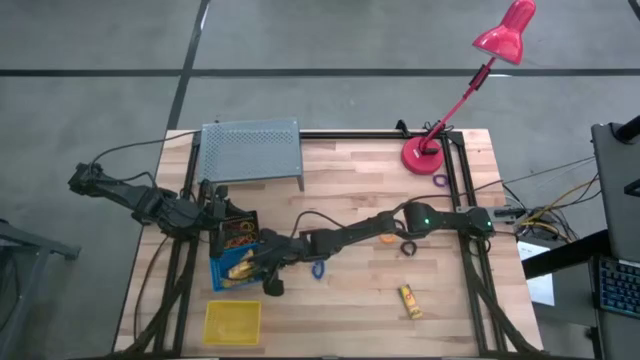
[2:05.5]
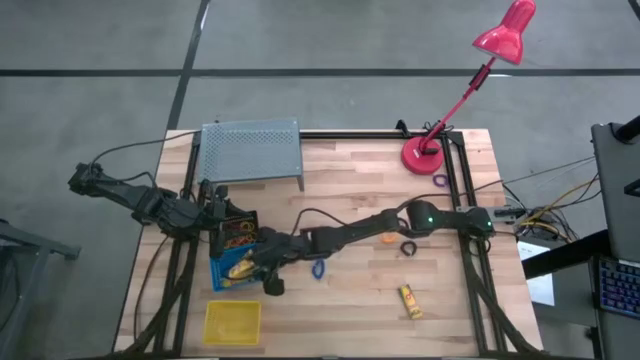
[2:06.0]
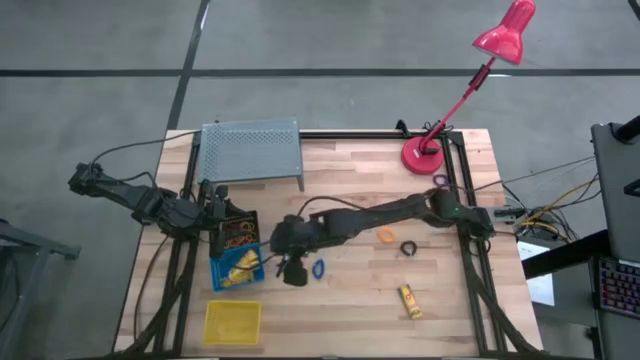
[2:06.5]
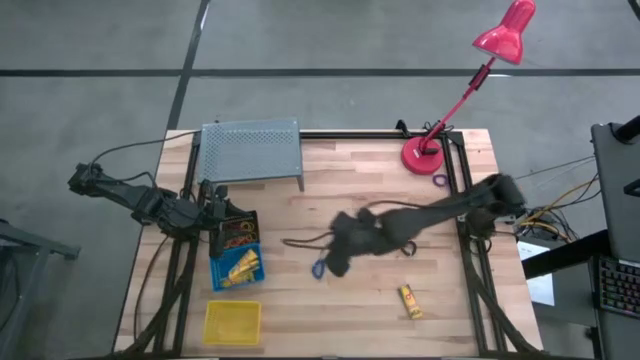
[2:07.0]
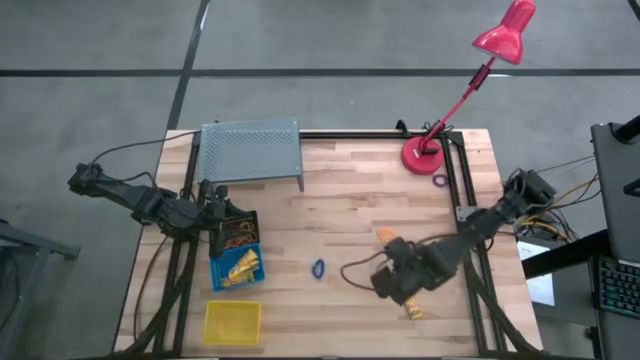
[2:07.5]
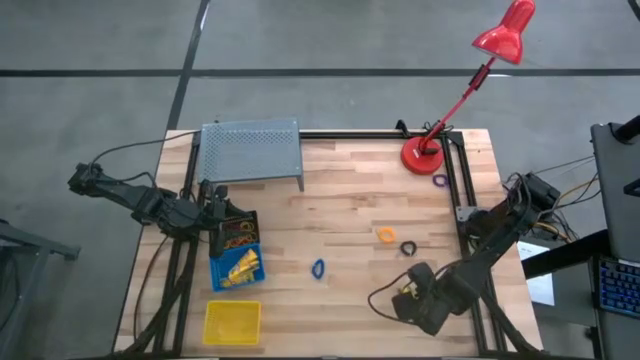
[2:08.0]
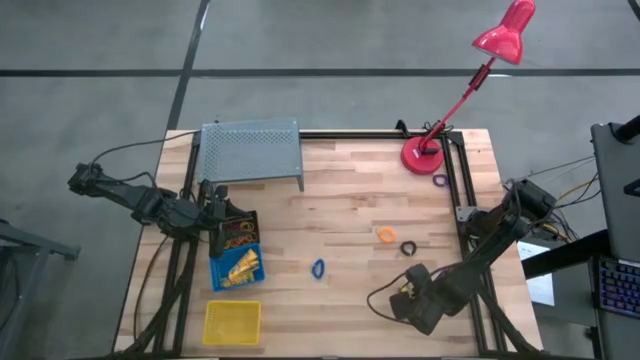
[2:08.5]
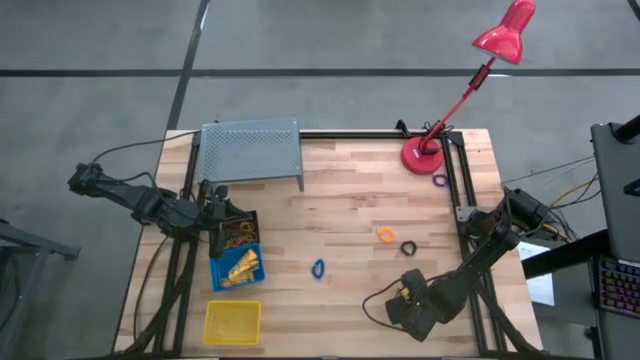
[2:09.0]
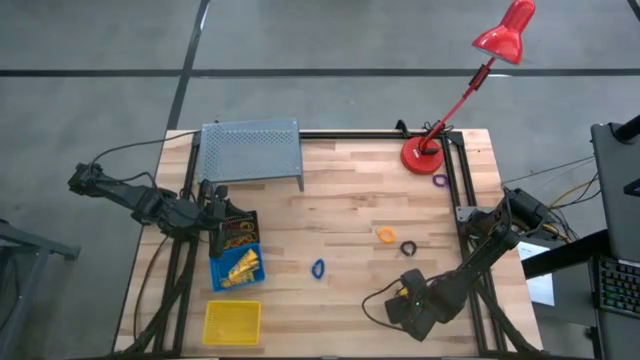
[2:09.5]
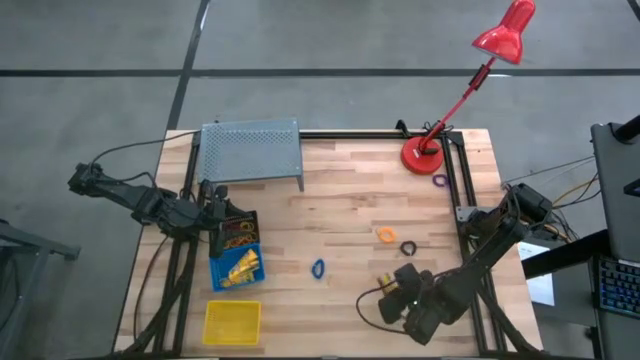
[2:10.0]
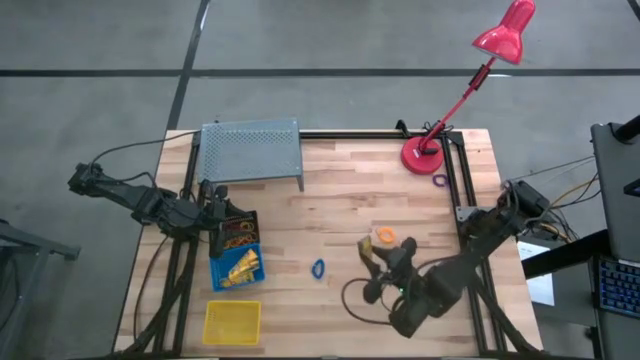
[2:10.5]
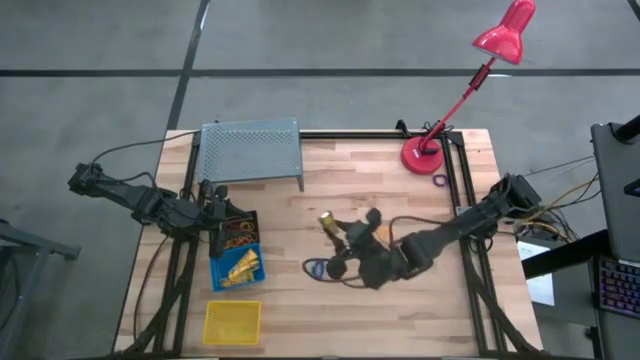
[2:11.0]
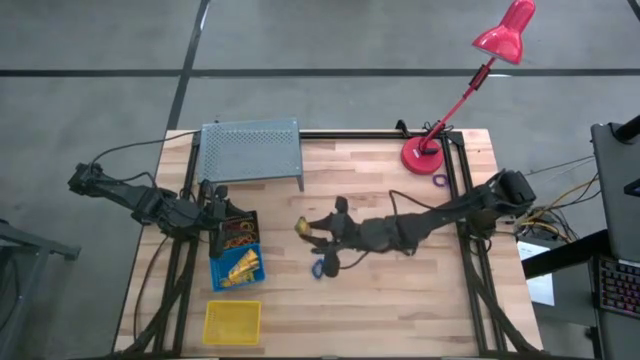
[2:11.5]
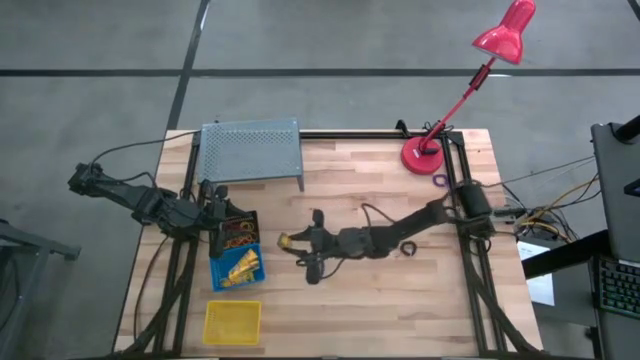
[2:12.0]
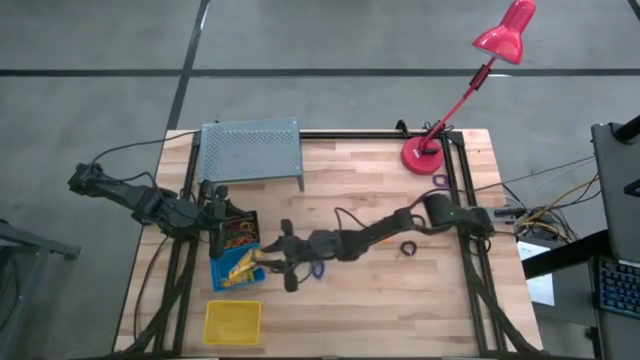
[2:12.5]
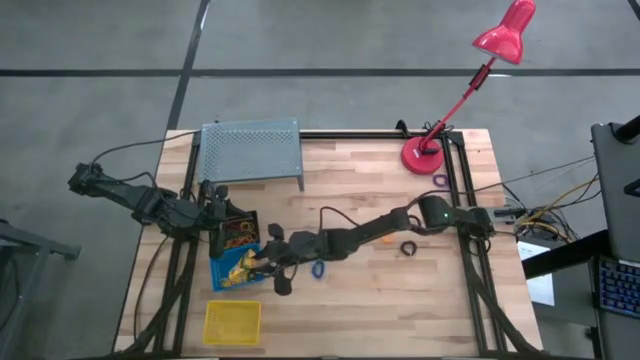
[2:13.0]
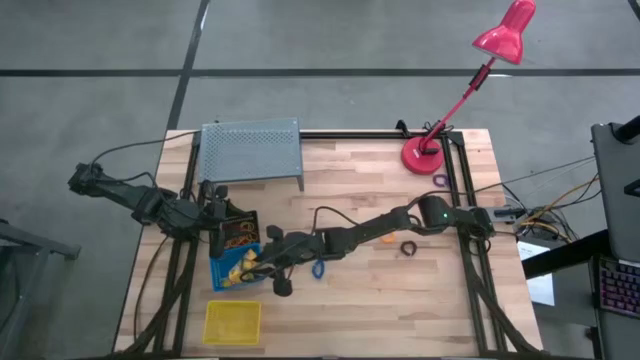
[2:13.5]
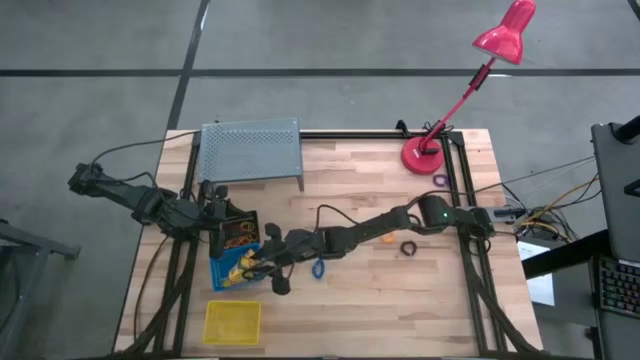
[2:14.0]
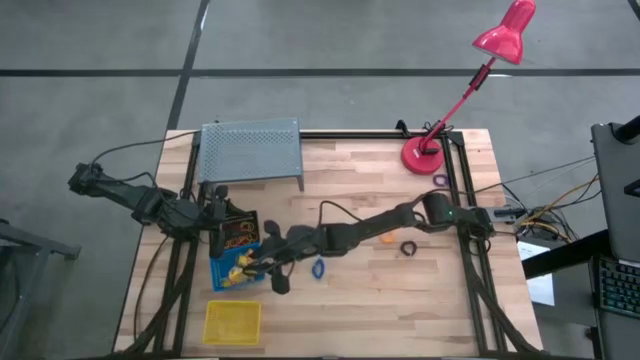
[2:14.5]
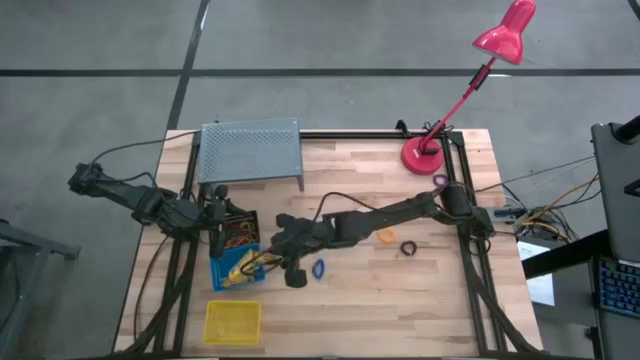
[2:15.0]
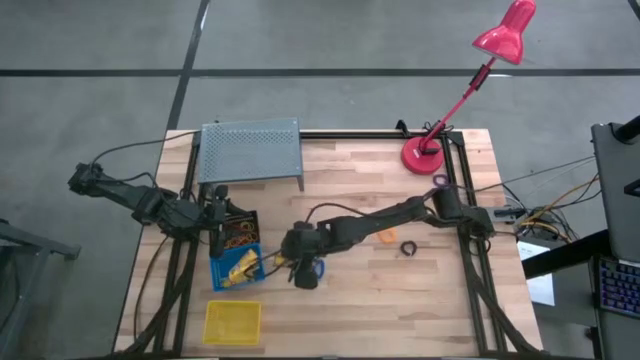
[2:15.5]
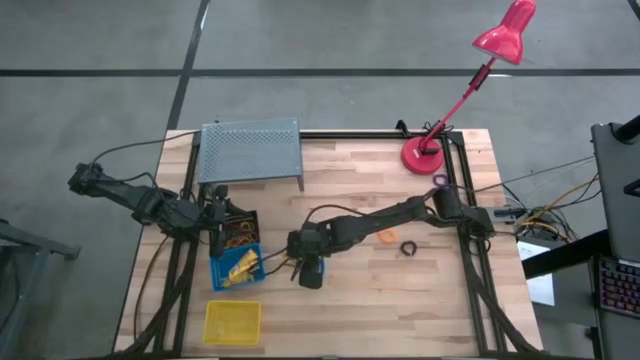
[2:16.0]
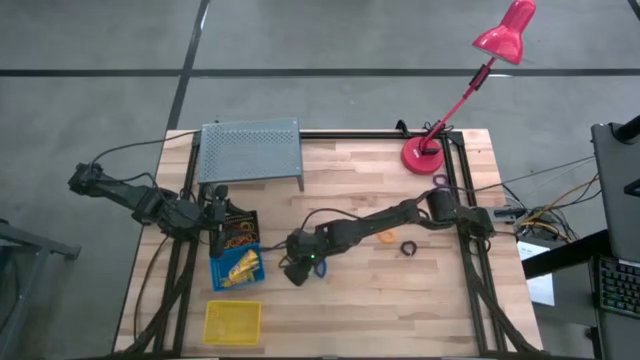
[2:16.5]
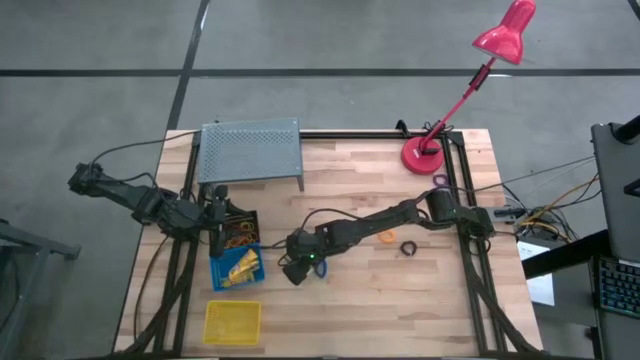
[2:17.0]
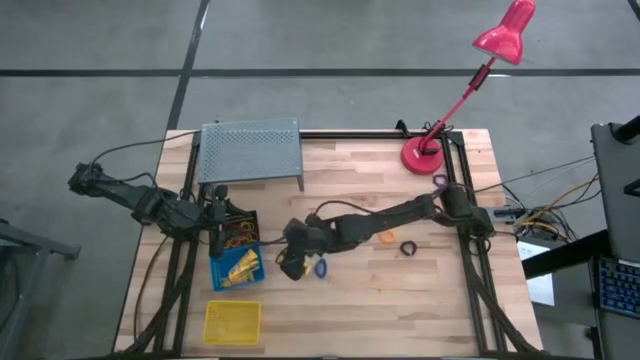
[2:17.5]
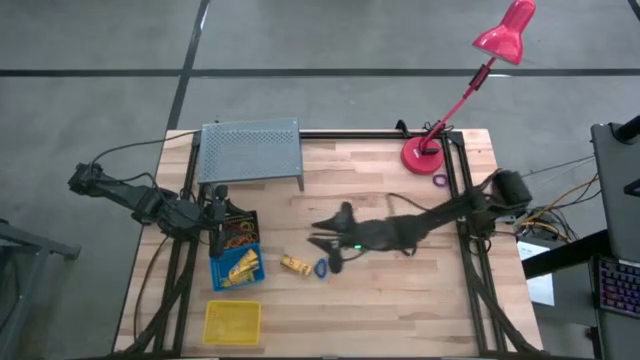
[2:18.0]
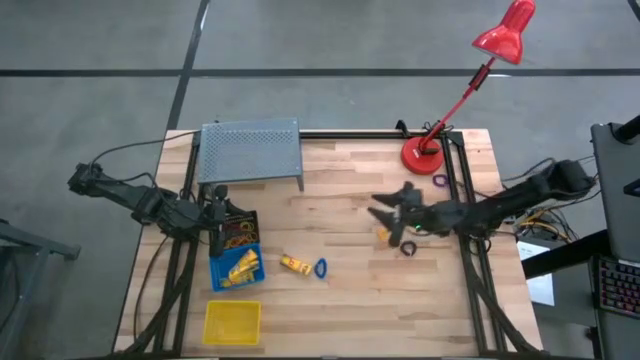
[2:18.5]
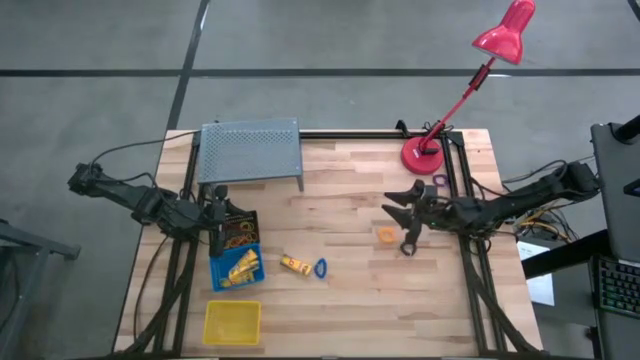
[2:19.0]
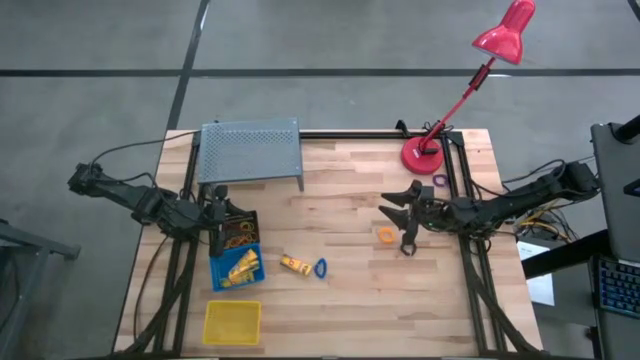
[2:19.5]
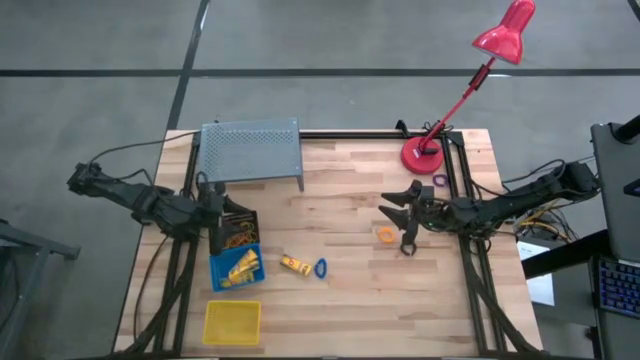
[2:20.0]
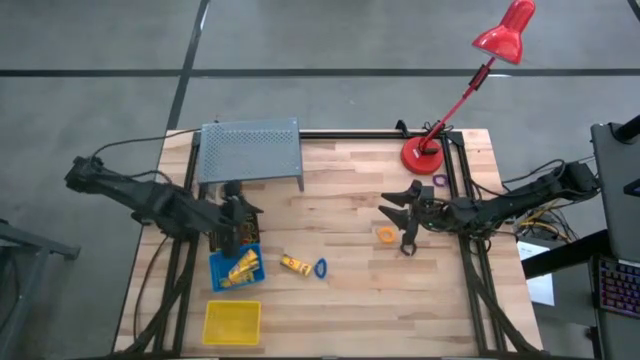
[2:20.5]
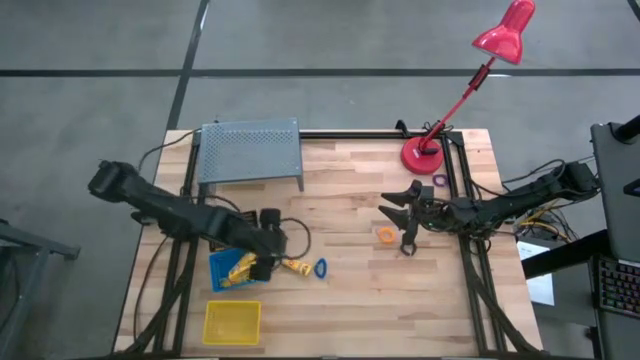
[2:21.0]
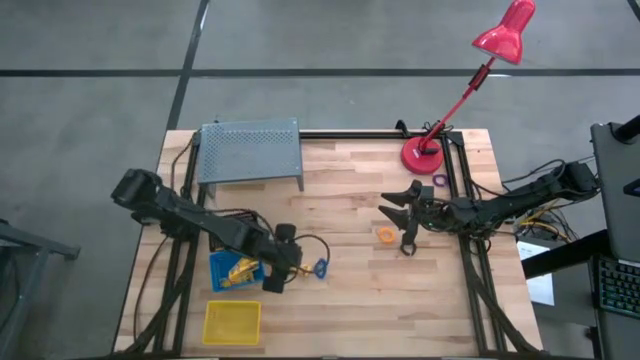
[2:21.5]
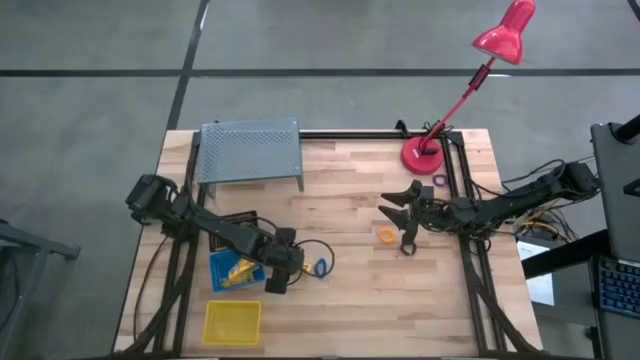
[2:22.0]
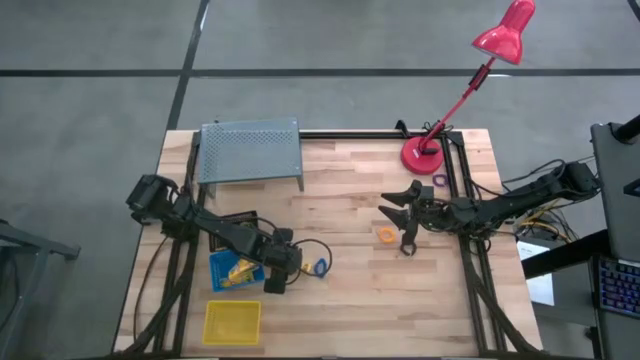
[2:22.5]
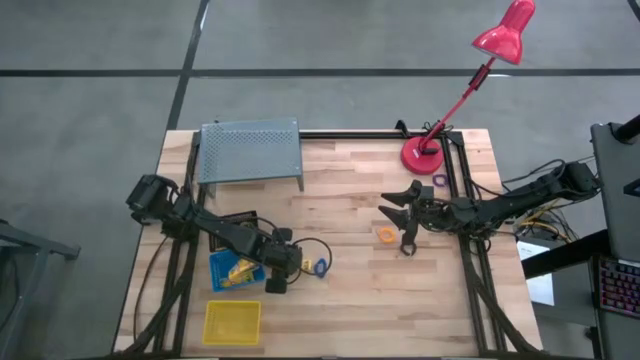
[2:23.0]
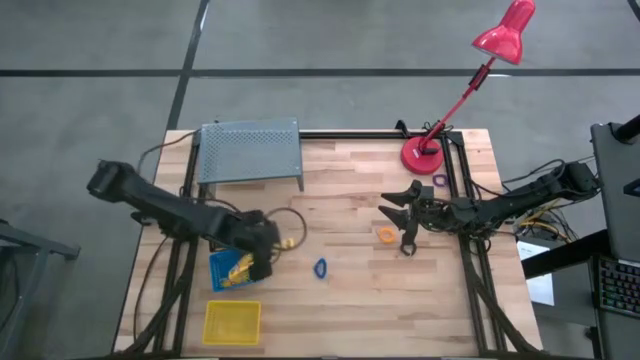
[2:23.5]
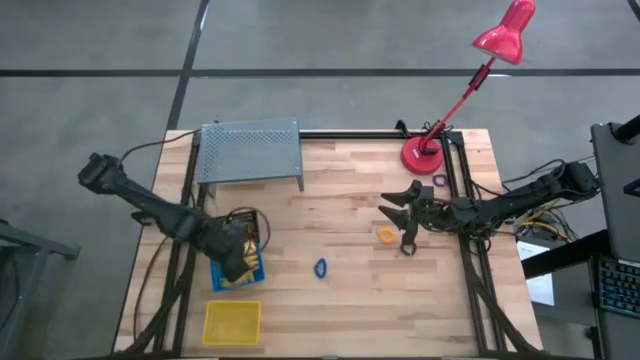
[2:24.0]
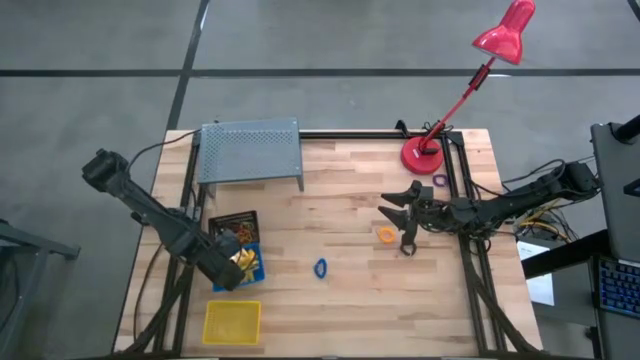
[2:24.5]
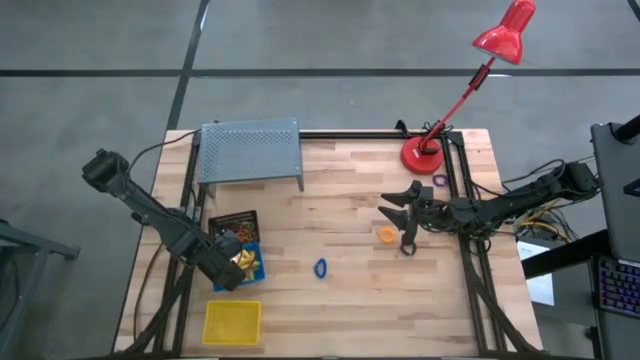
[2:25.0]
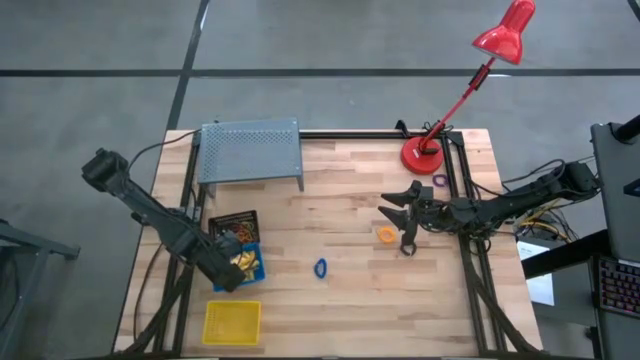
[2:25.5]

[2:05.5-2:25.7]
Task: Pick & Place Office Desk Supplies
Put the yellow crayon box in the blue bin

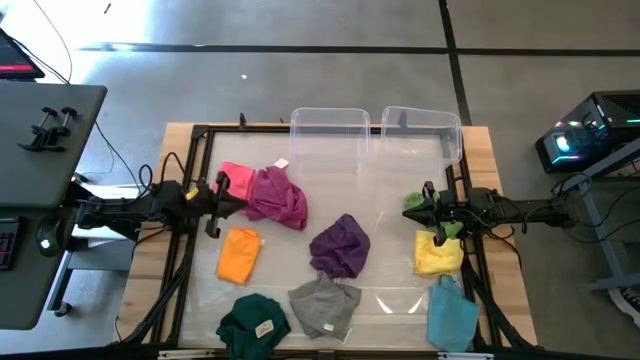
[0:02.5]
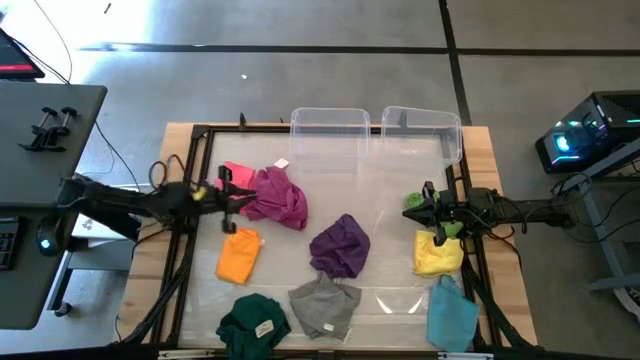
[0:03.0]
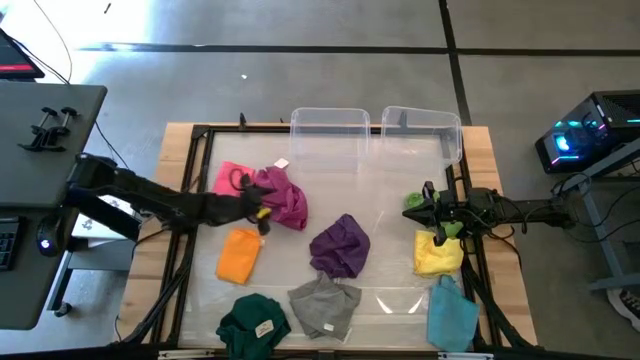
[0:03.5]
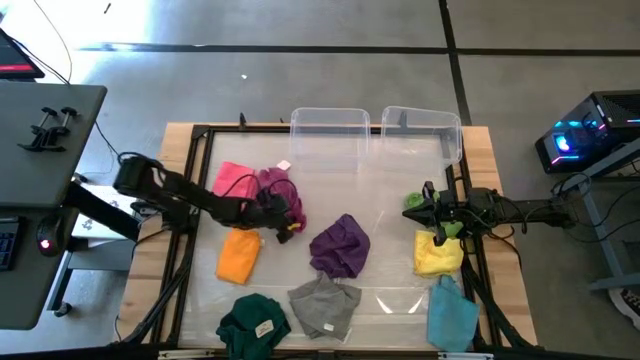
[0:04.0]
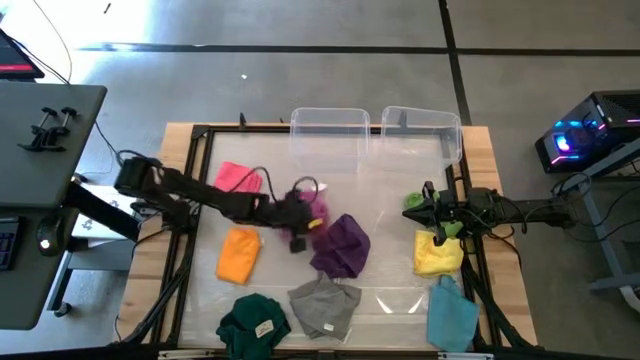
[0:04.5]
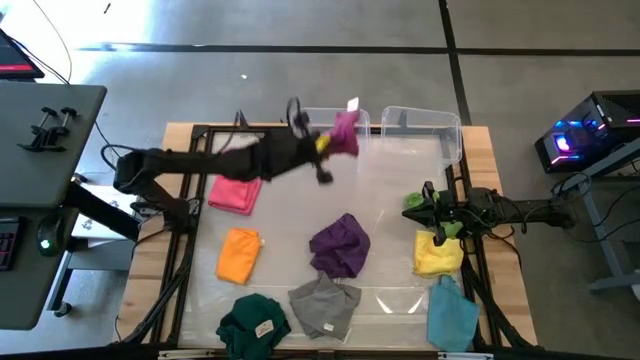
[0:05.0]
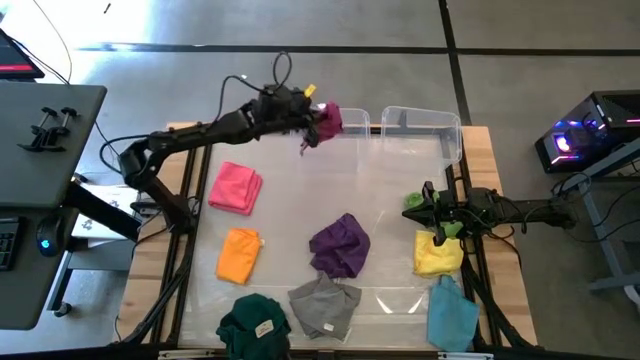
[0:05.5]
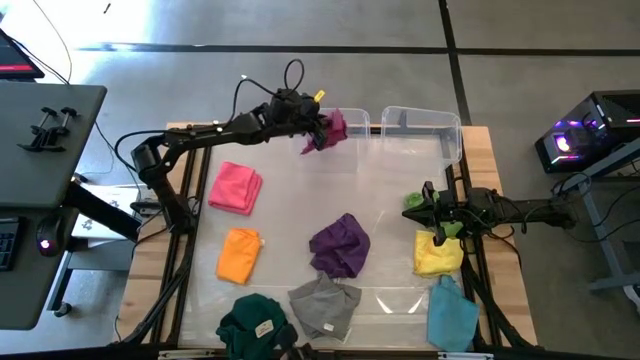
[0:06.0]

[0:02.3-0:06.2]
Task: Sort towels by color in basket
Put the dark pink towel into the left transparent bin
